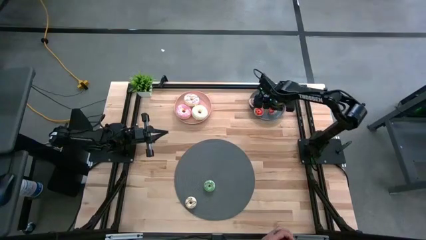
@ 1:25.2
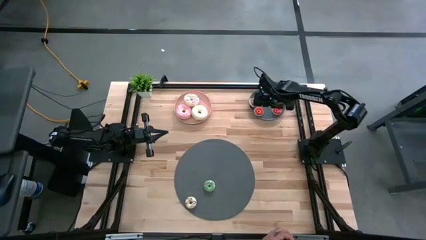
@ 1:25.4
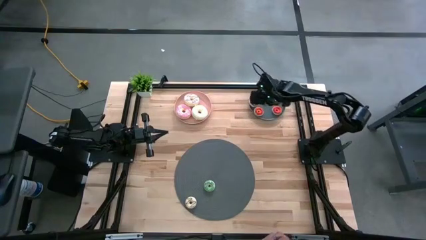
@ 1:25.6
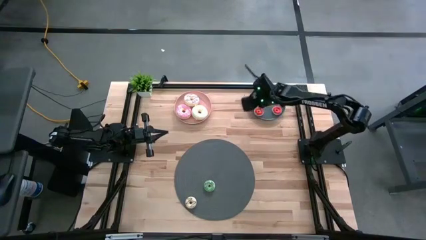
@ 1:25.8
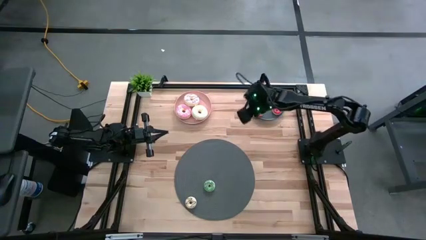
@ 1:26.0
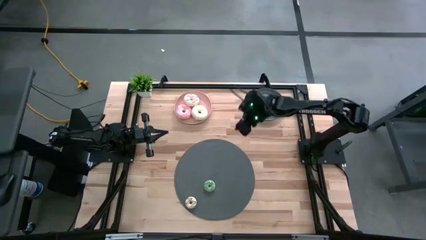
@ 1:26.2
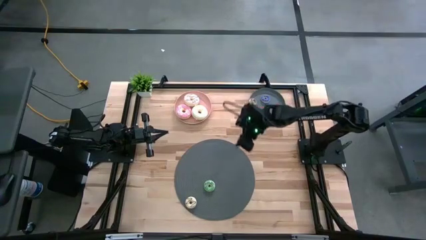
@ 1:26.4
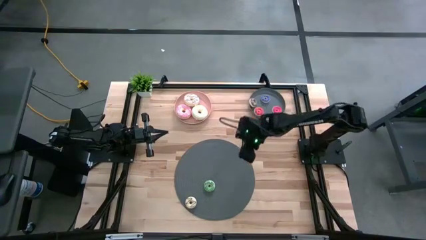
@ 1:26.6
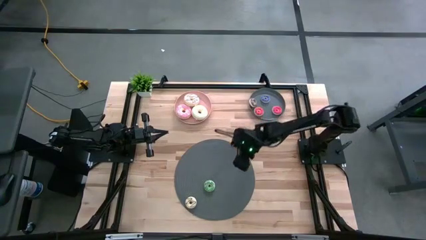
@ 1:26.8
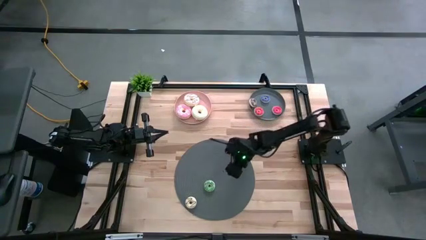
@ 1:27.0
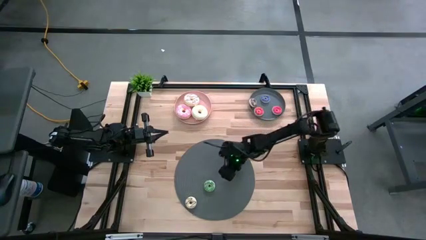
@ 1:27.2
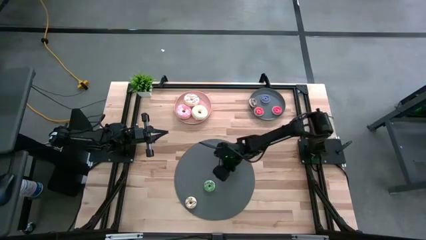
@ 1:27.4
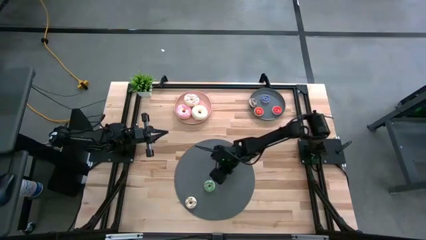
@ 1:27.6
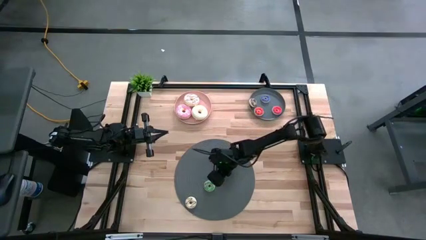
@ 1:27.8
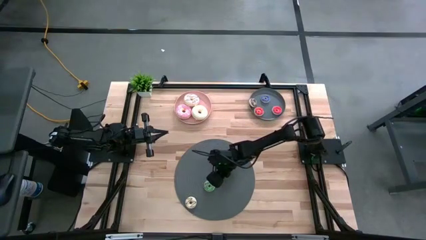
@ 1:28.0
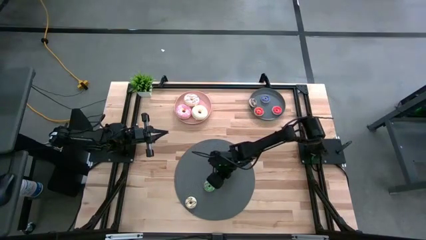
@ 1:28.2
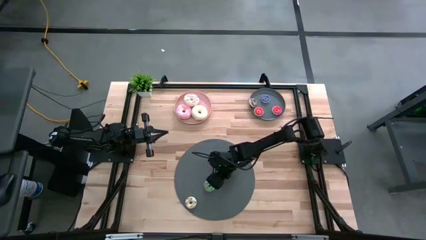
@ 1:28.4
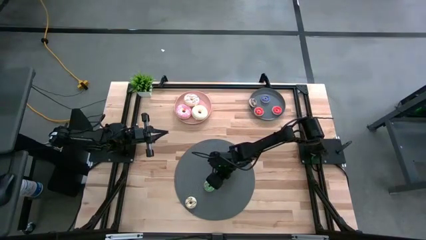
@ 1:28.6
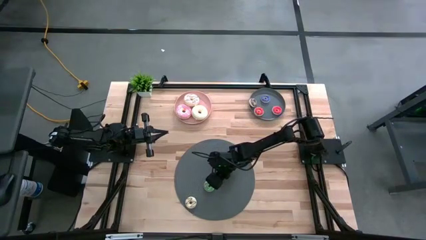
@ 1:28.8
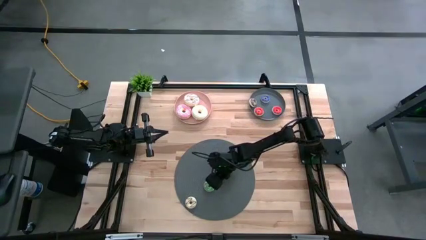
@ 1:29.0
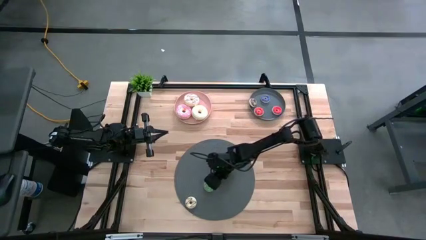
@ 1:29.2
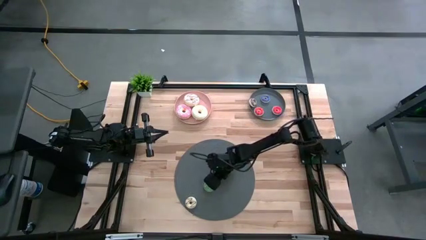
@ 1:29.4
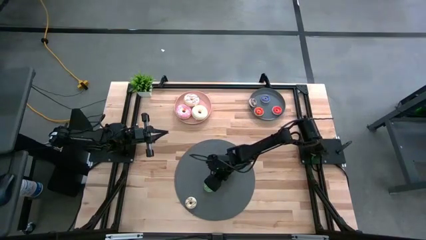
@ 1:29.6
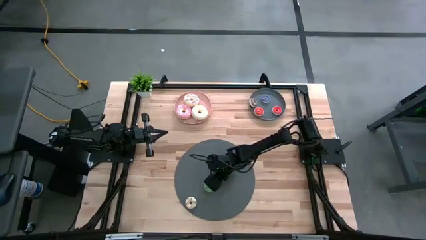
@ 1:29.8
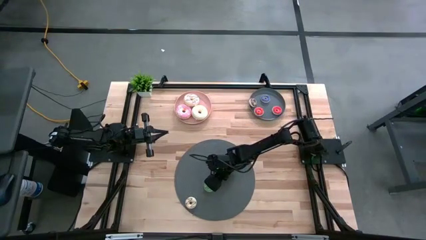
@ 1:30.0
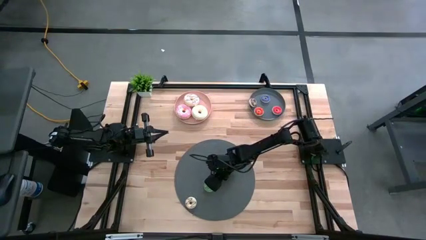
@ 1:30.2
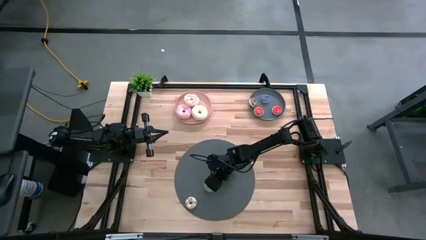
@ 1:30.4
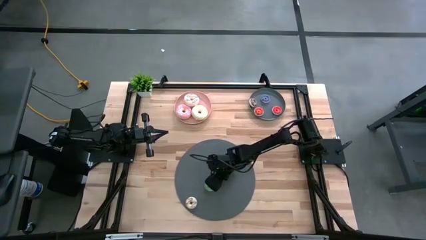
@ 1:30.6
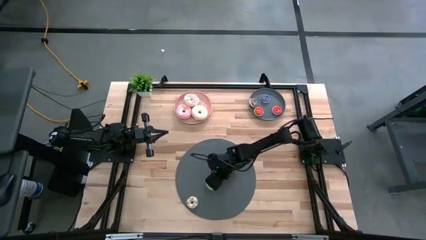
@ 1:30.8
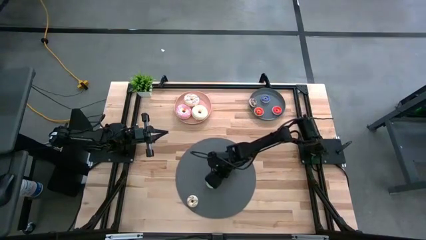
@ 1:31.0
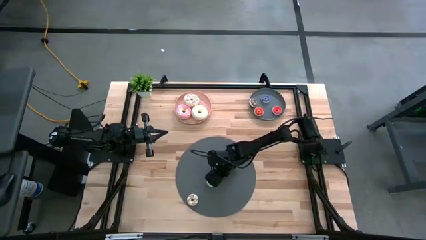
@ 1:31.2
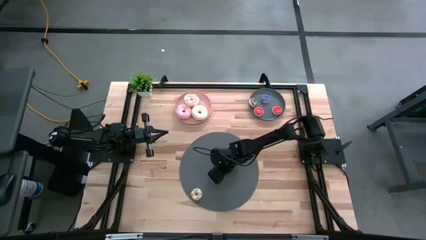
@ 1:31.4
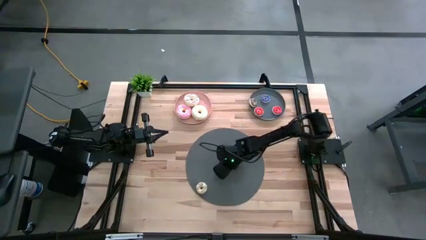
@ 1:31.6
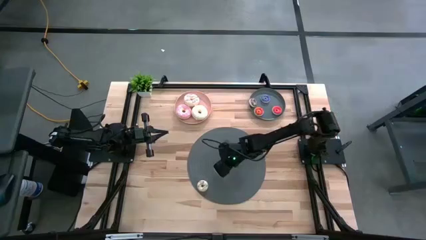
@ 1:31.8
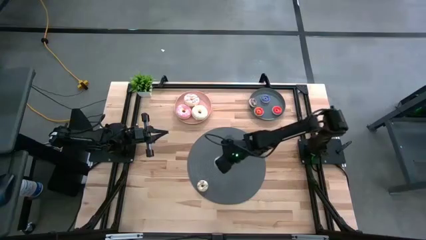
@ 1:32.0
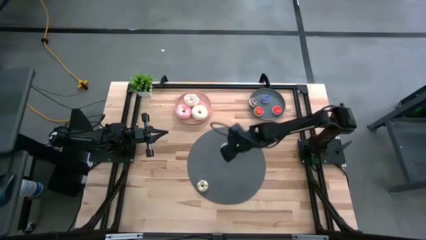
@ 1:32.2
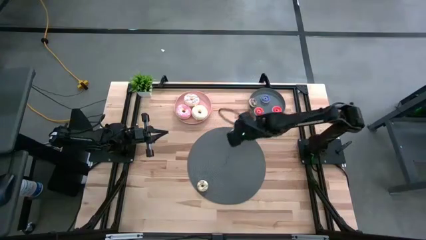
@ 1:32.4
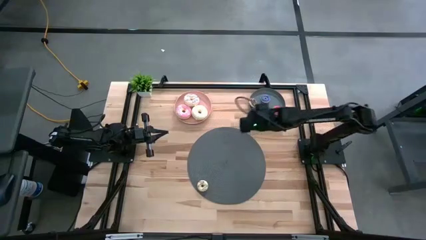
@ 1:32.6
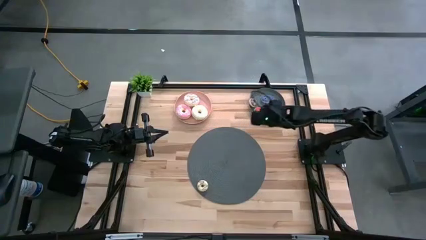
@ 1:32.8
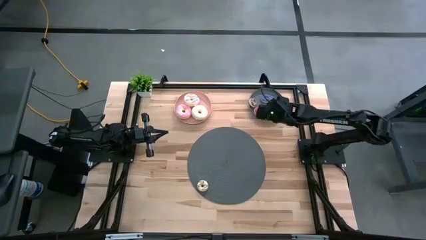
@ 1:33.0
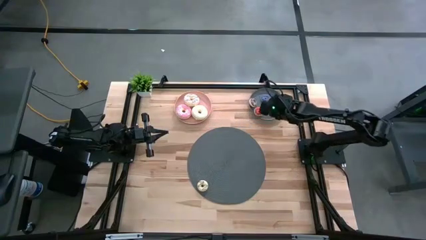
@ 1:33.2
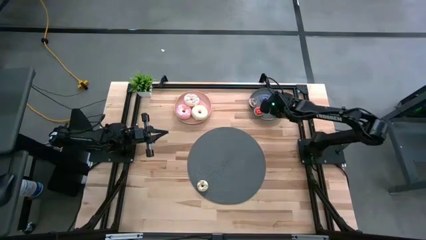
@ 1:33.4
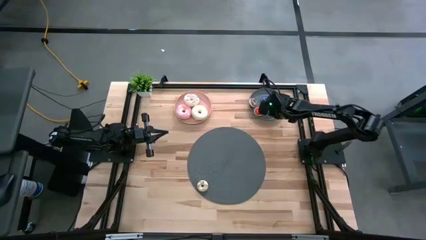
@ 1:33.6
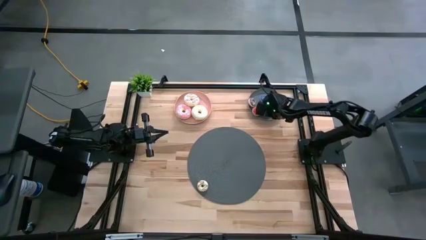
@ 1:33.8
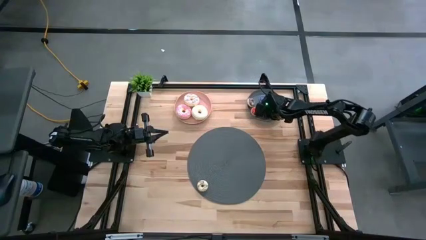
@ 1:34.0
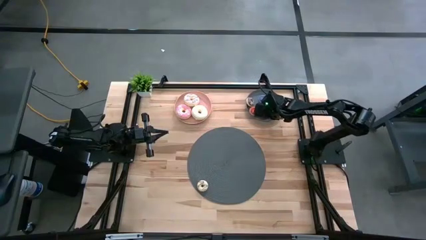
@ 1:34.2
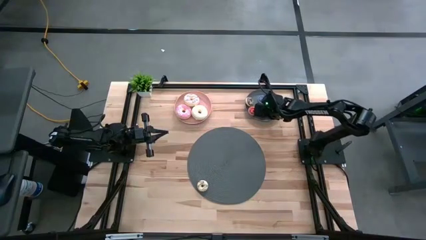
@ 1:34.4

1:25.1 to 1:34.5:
Task: Pick & Place donuts
Put the small green donut on the gray plate

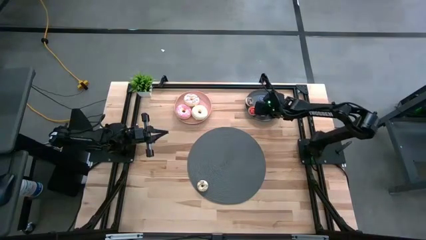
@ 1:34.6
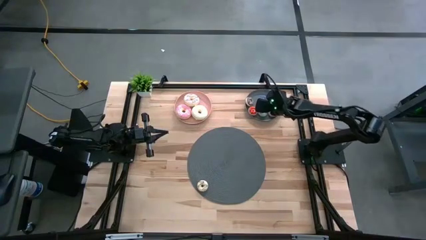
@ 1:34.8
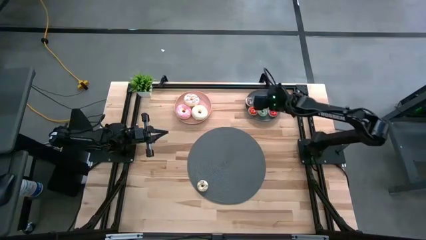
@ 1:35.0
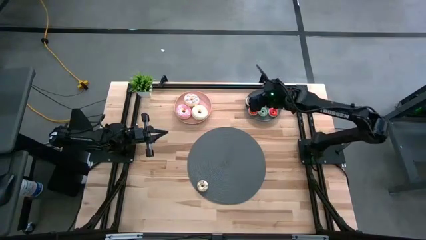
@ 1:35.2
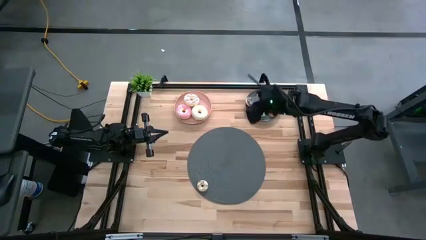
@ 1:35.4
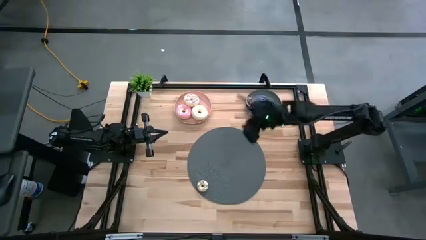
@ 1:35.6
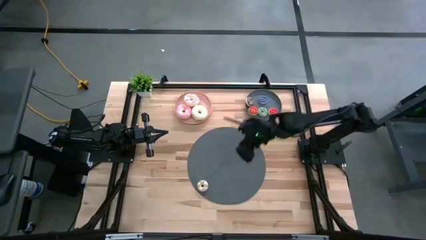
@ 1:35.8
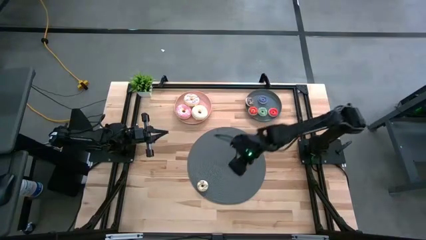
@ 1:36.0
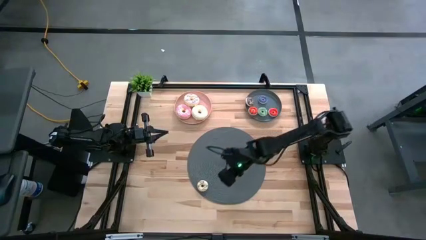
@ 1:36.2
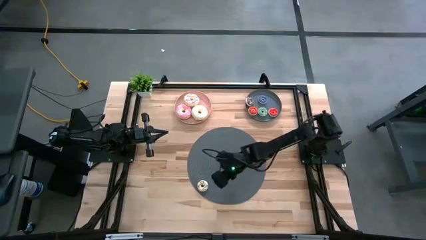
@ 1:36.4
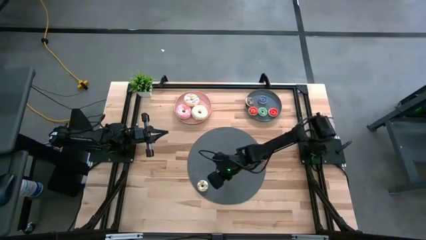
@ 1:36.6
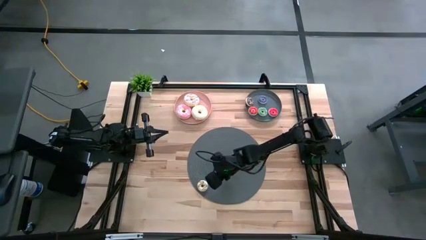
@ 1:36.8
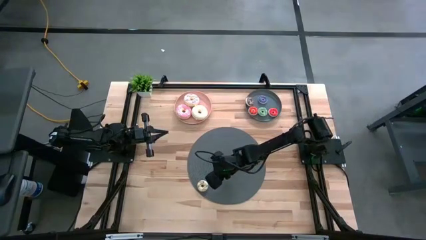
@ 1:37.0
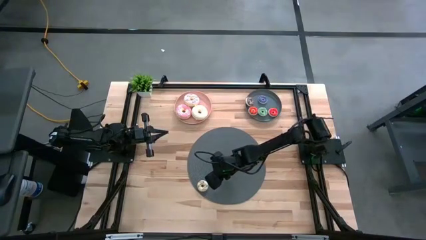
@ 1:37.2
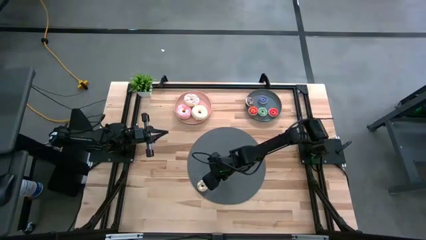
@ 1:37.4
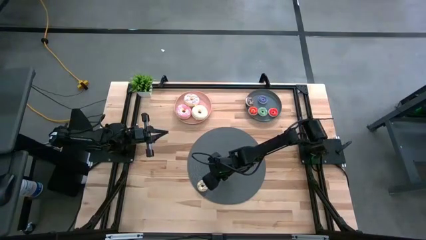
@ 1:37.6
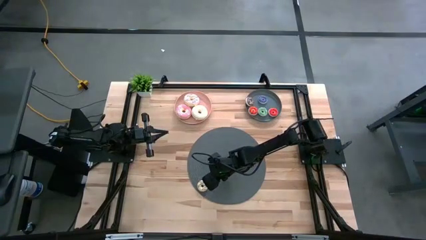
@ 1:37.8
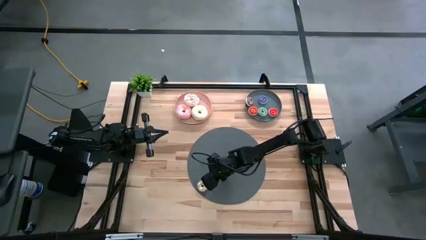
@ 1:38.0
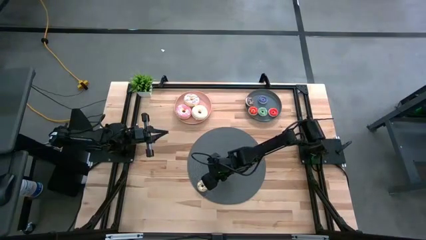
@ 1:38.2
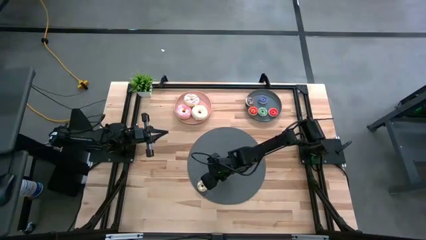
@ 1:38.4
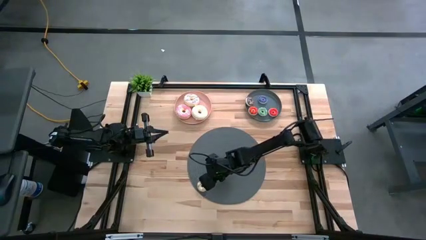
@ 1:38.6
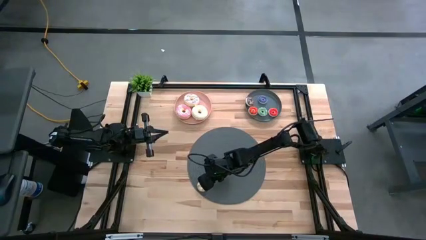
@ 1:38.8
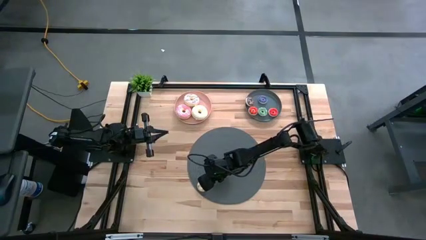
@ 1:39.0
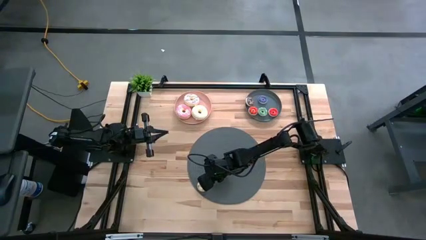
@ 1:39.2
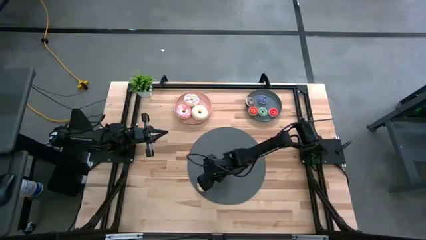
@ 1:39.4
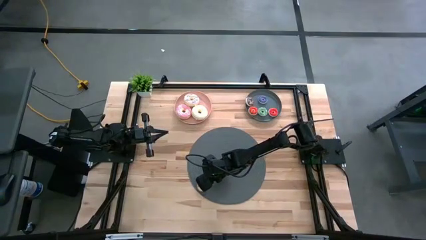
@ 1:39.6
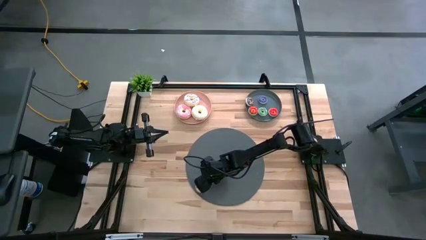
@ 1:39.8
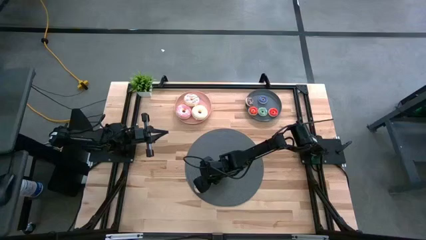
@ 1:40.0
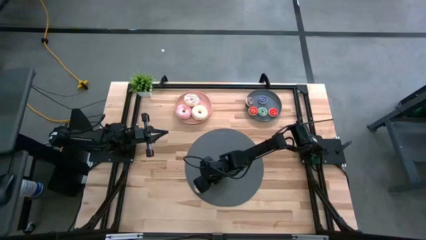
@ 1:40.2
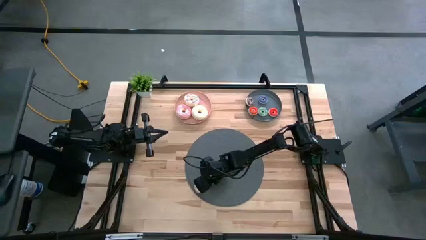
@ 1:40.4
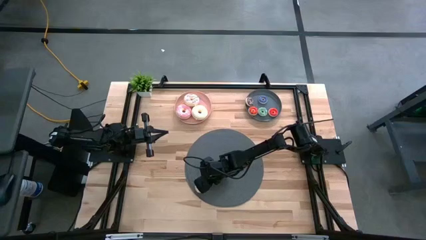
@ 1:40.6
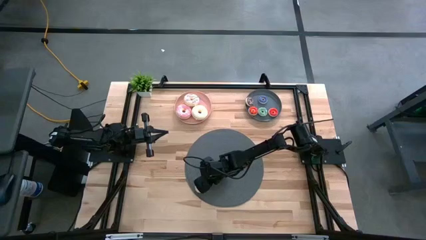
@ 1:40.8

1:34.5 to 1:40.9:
Put the small white donut on the gray plate

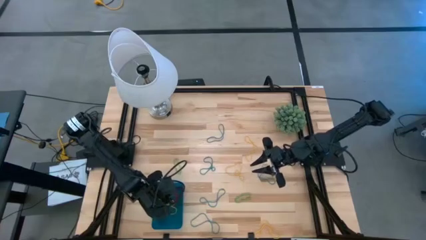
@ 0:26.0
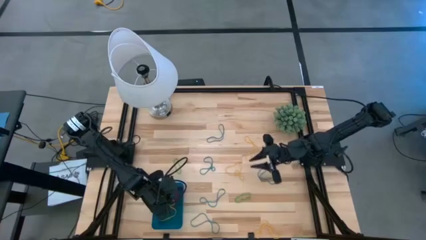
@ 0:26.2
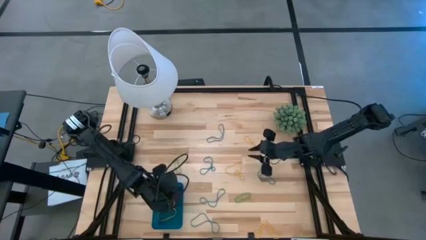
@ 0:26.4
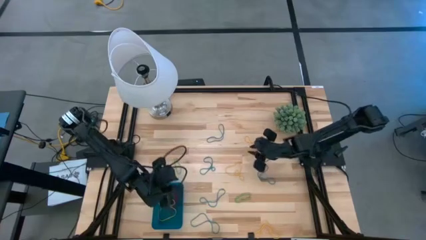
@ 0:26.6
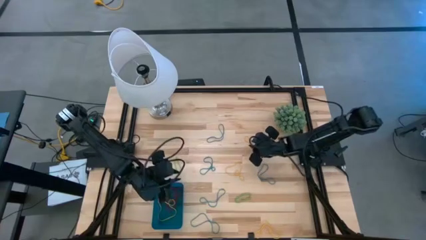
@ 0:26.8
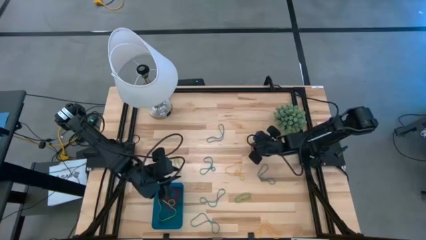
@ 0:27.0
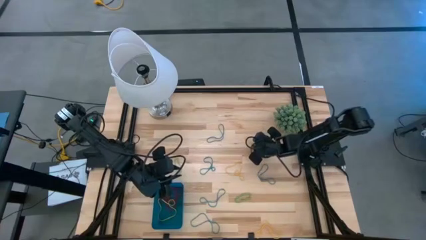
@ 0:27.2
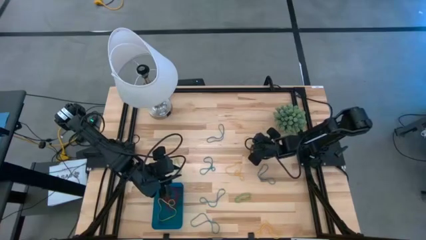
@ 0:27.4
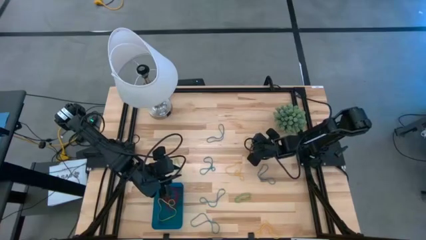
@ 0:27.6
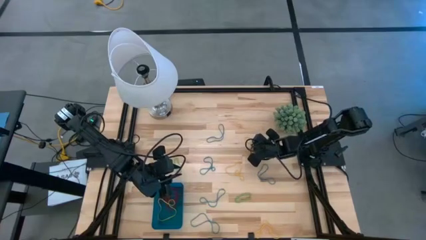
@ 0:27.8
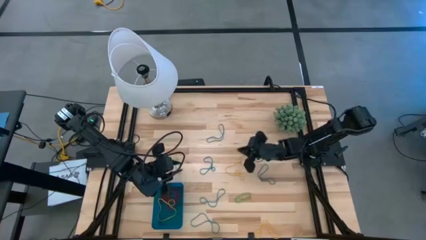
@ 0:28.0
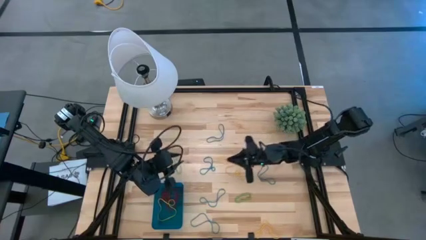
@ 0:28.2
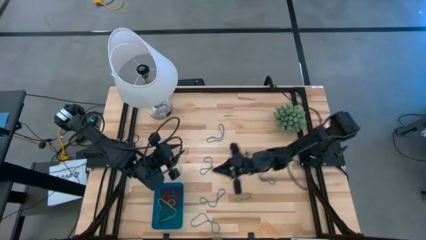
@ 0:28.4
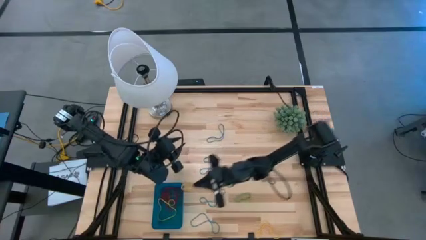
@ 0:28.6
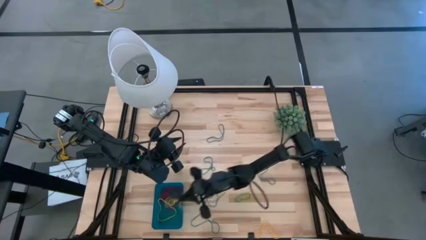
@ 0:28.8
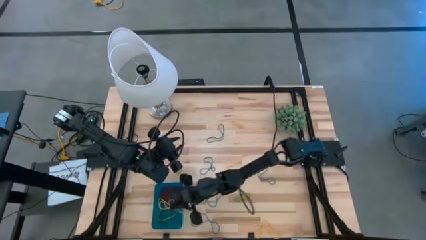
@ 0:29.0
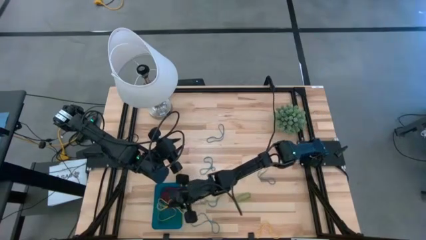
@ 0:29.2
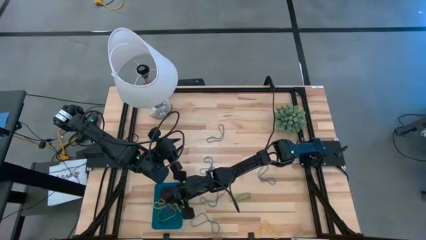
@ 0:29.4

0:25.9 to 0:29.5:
Task: Pick and place items into bin
Put the top yellow rubber band into the blue bin
